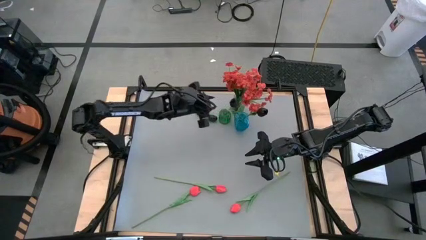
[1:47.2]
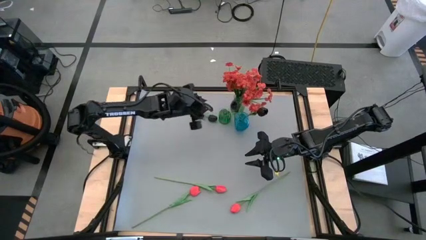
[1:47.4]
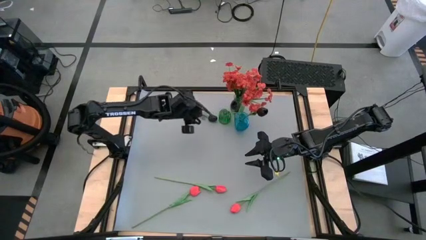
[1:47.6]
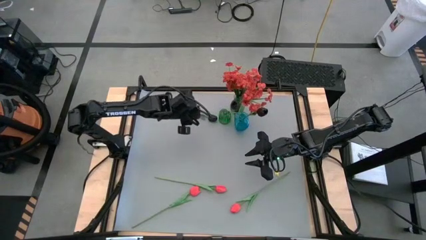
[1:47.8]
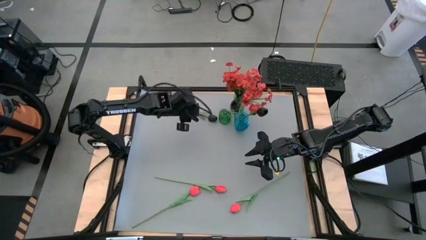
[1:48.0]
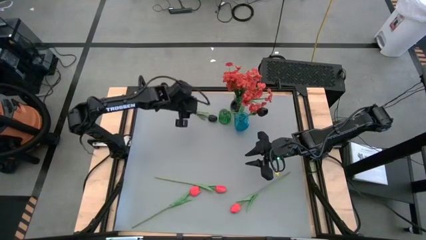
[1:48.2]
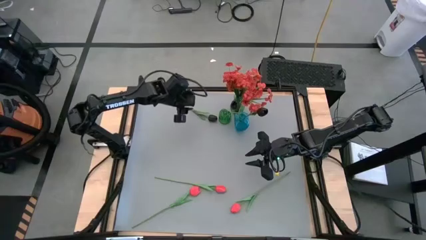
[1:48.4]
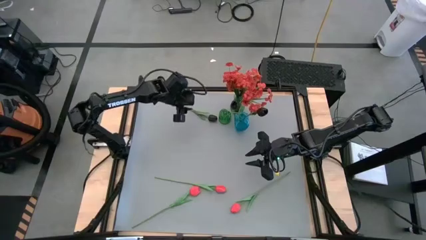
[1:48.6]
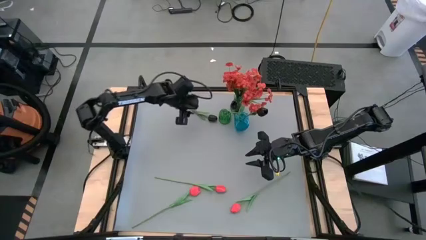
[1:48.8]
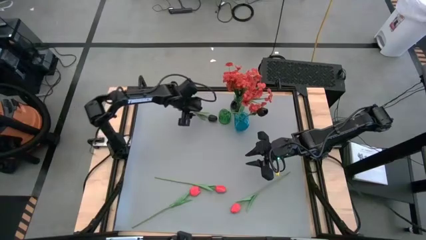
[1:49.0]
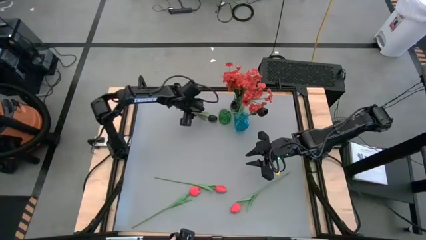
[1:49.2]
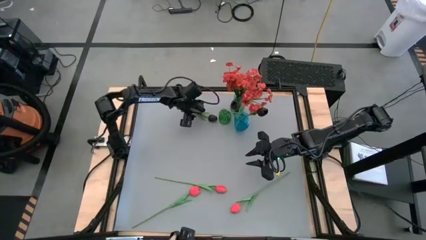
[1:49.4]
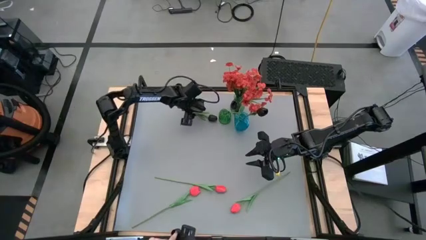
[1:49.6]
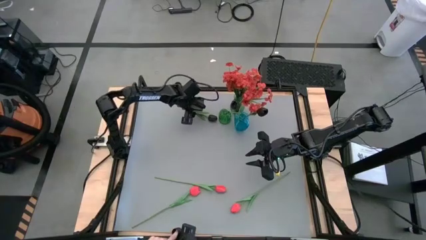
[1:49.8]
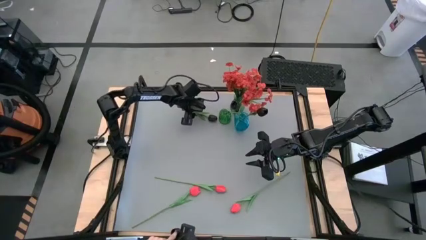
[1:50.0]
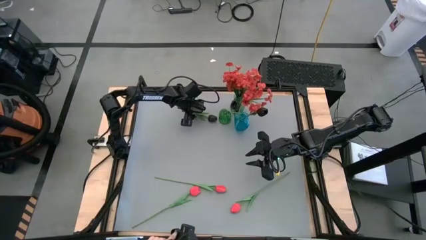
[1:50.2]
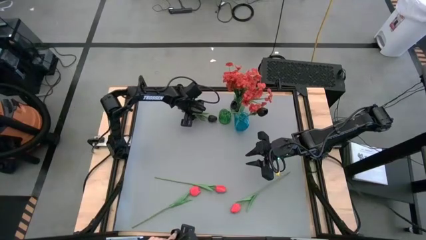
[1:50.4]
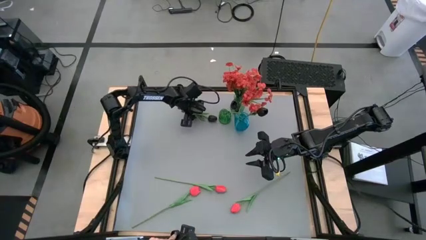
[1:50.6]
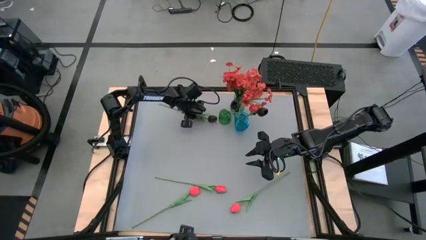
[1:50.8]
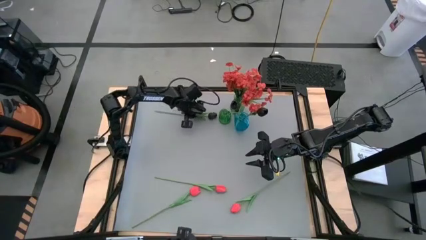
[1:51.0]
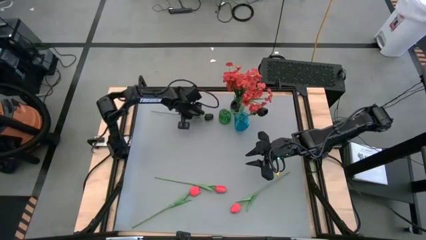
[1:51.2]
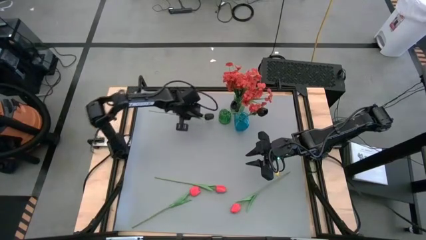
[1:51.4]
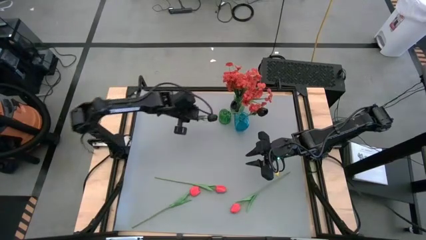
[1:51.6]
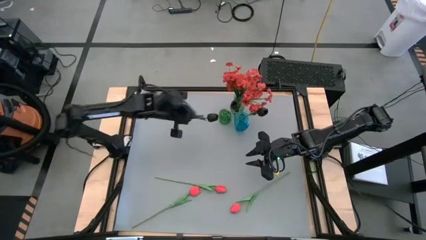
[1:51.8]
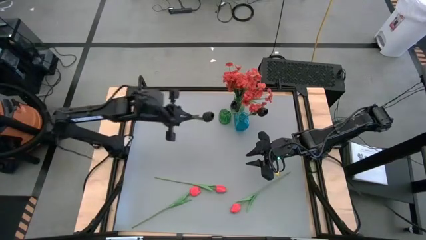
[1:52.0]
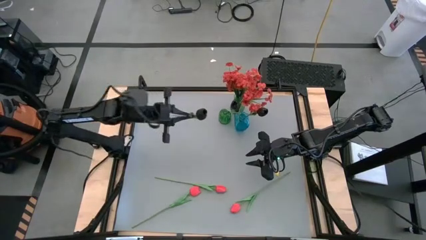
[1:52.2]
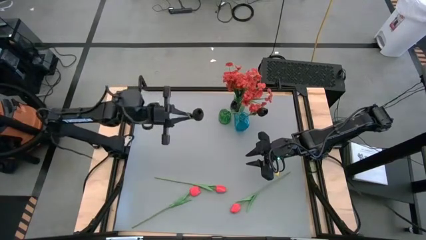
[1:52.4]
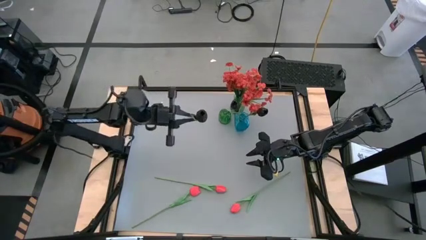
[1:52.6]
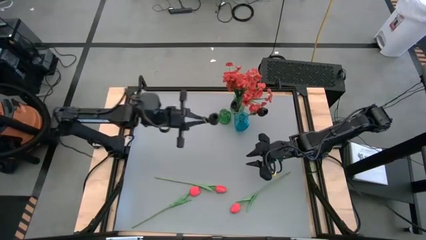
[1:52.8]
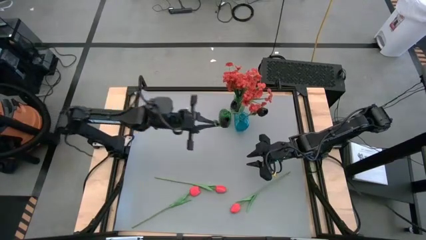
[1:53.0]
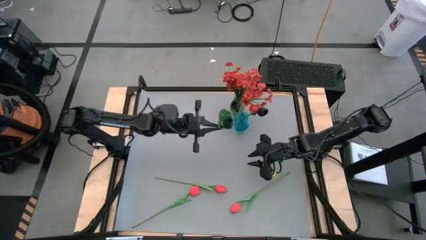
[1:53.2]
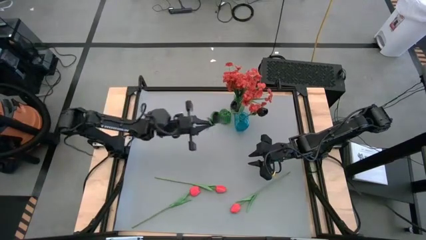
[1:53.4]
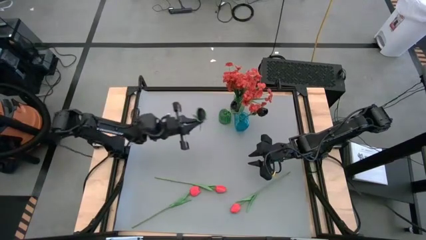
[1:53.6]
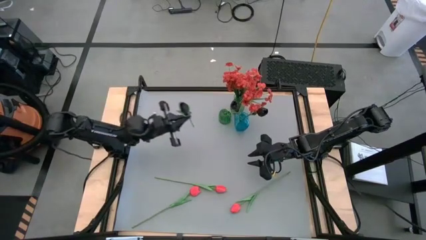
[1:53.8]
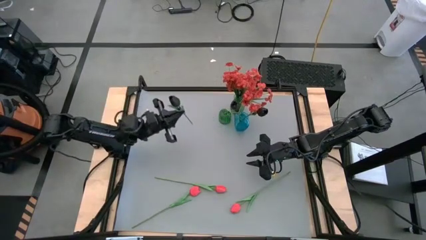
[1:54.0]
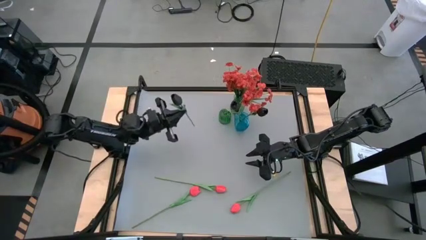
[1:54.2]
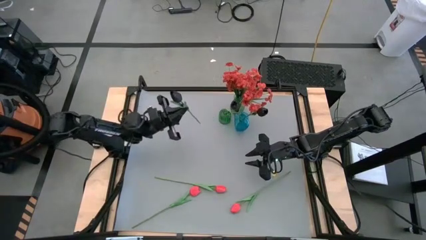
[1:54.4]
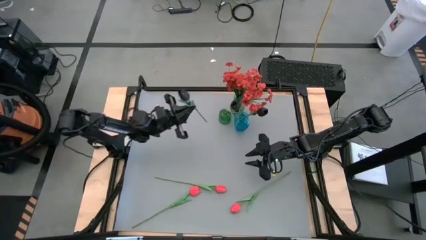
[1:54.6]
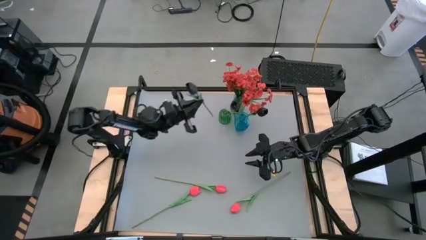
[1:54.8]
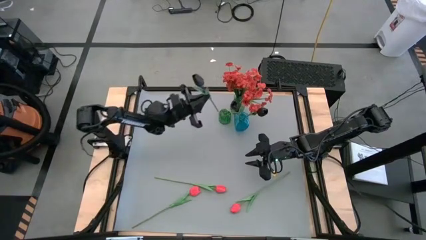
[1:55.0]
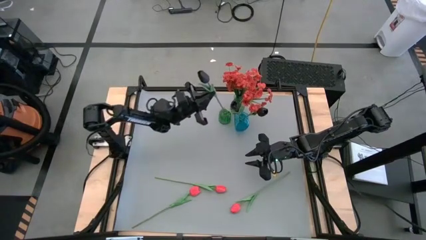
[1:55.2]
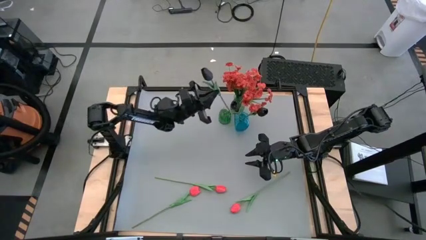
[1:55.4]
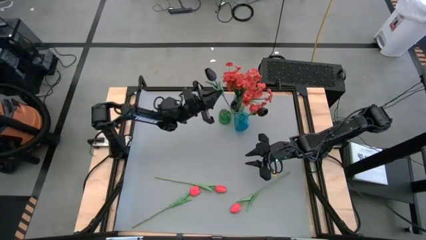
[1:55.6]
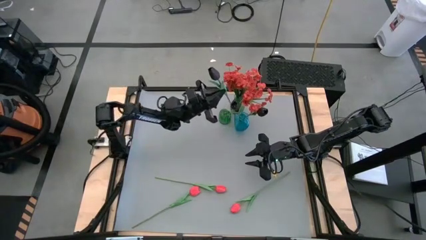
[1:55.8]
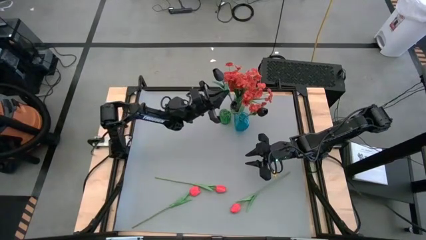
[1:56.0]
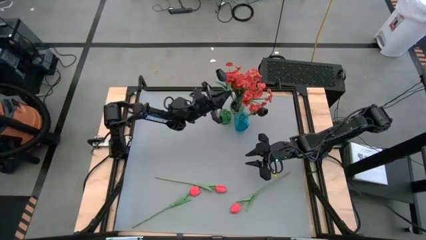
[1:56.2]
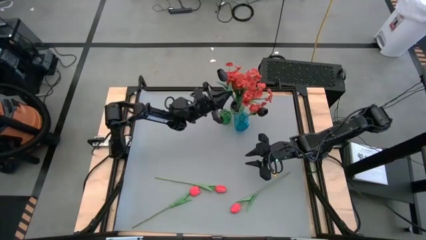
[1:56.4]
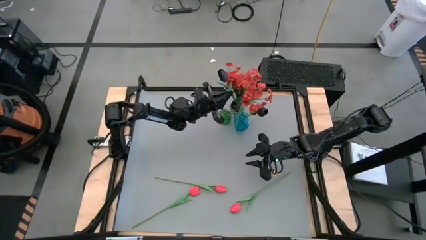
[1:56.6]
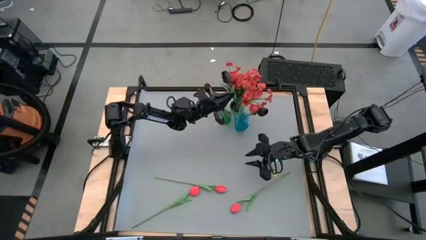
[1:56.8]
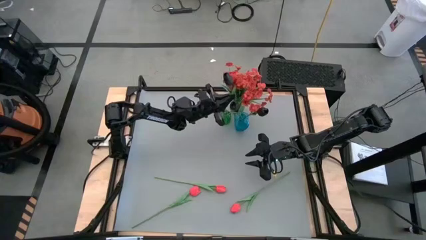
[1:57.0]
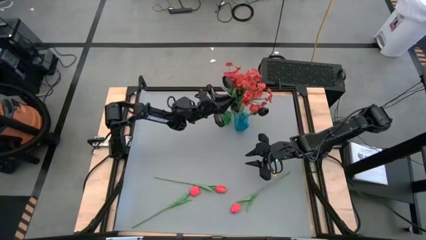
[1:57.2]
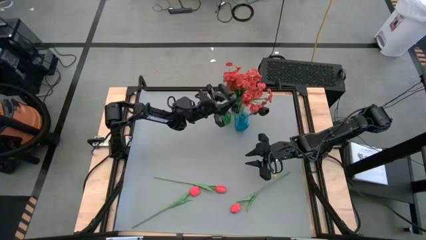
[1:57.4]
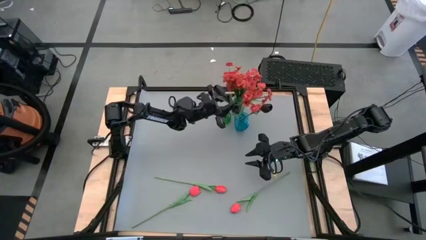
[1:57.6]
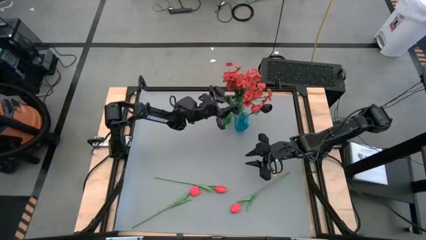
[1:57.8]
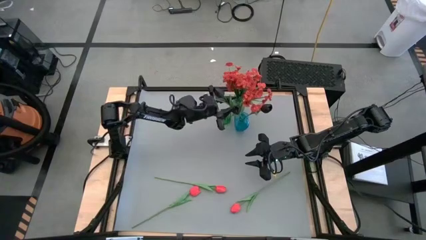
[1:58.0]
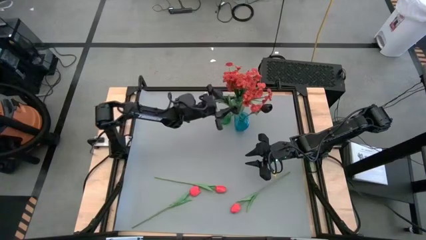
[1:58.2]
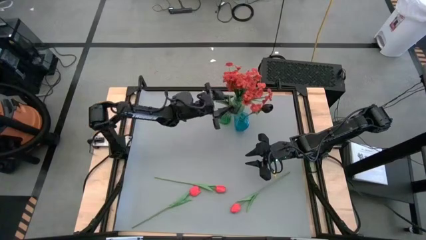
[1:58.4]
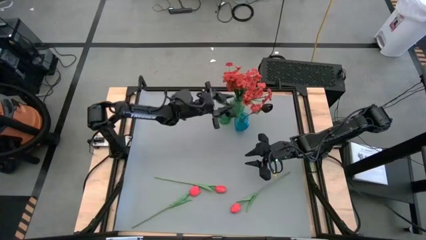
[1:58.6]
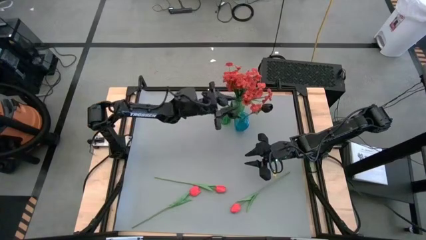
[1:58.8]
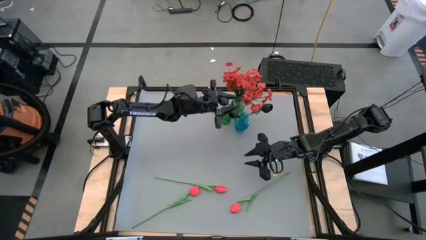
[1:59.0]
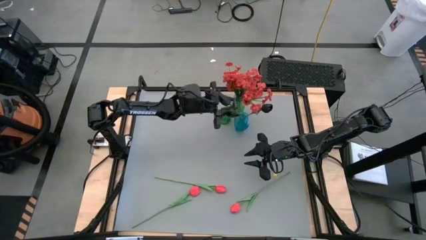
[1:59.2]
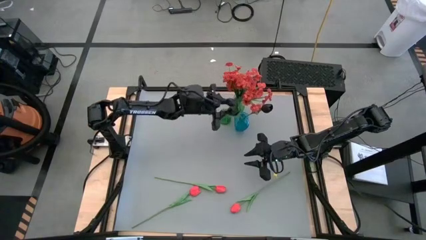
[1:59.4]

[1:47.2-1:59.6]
Task: Sort flowers into vase by color
Put the black flower into the blue vase

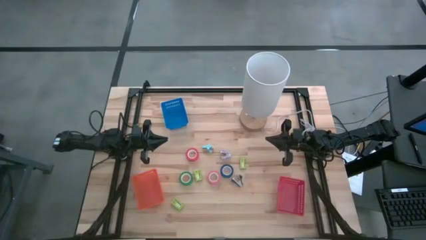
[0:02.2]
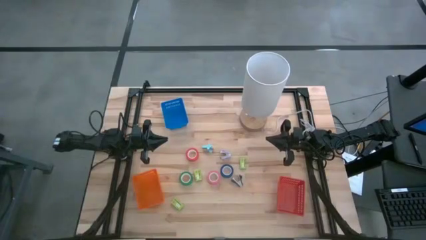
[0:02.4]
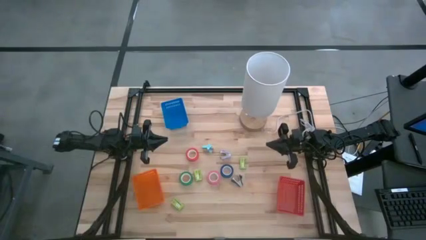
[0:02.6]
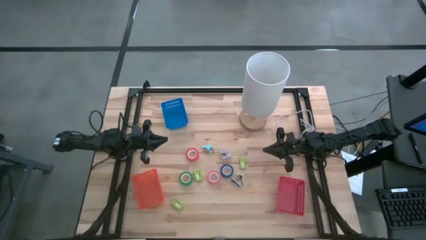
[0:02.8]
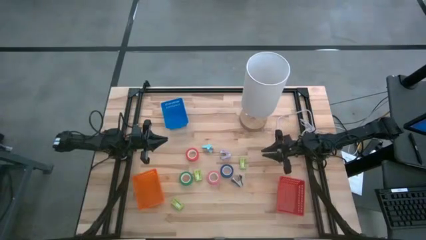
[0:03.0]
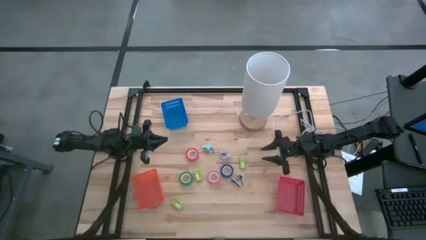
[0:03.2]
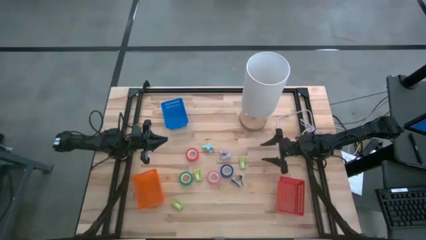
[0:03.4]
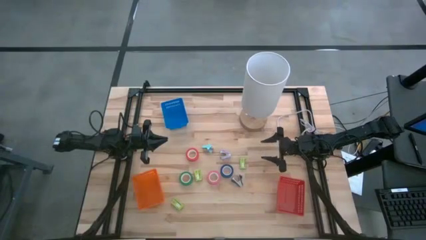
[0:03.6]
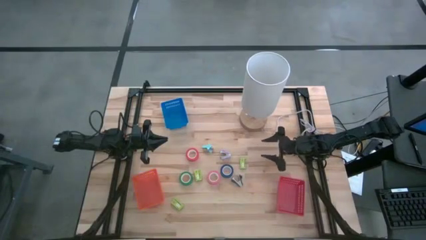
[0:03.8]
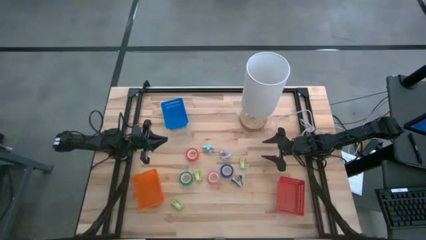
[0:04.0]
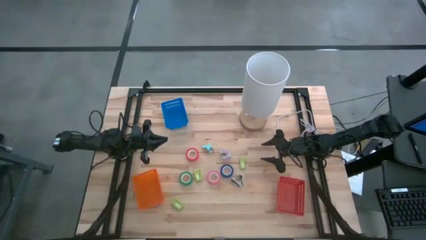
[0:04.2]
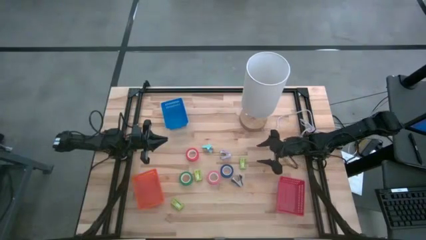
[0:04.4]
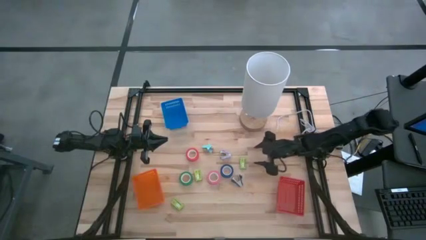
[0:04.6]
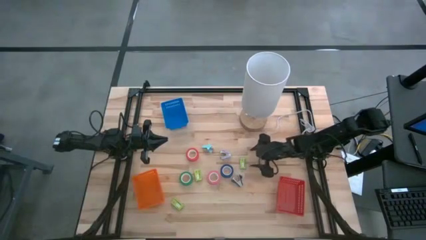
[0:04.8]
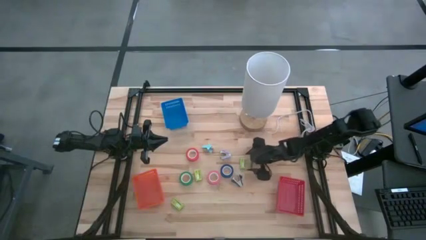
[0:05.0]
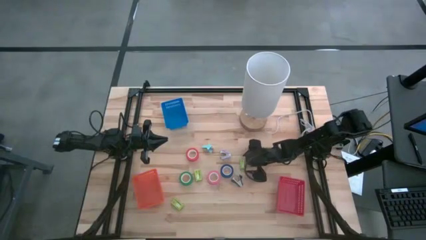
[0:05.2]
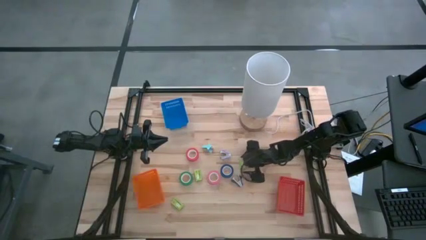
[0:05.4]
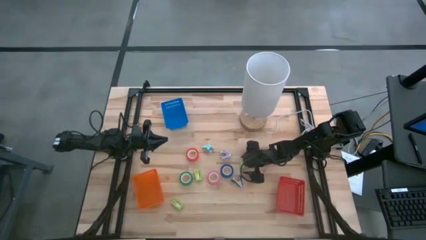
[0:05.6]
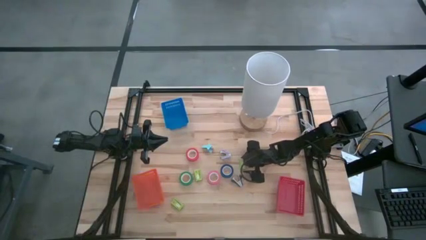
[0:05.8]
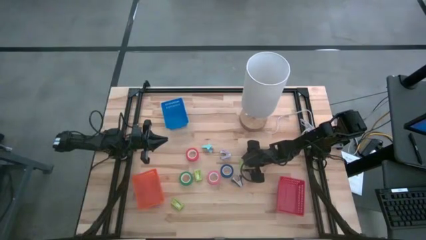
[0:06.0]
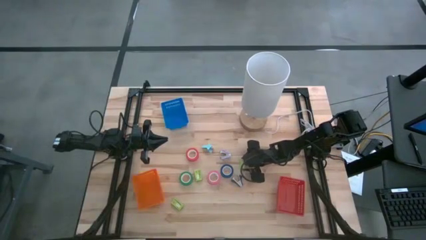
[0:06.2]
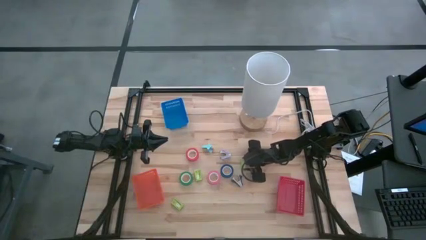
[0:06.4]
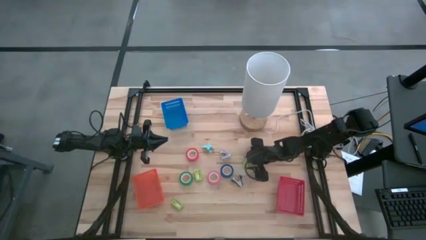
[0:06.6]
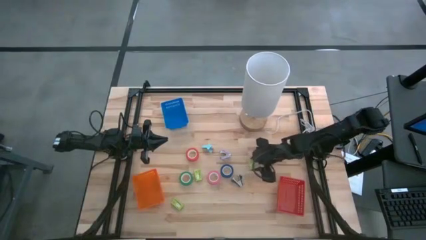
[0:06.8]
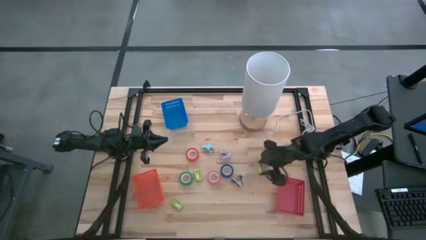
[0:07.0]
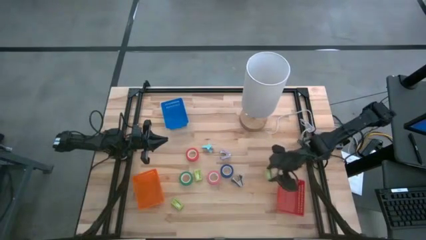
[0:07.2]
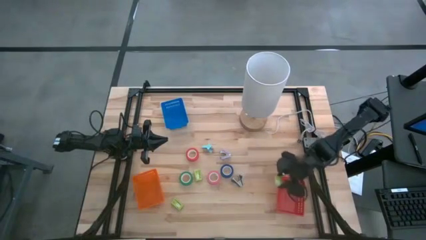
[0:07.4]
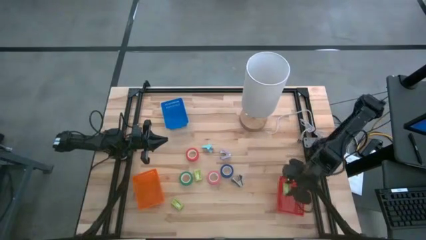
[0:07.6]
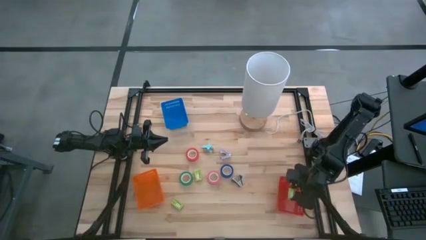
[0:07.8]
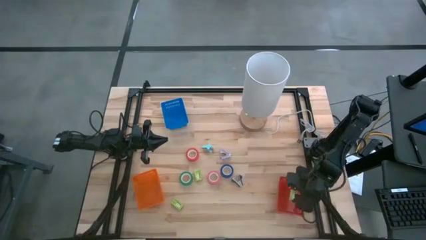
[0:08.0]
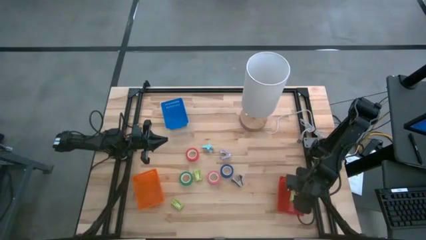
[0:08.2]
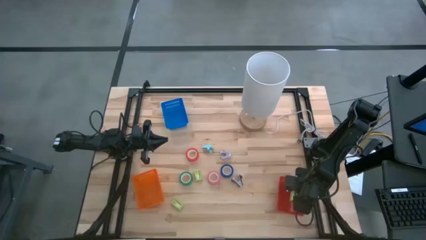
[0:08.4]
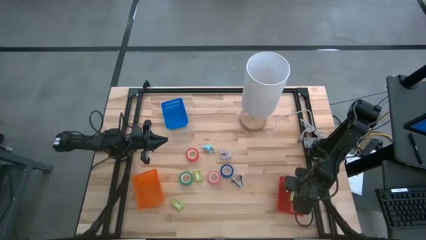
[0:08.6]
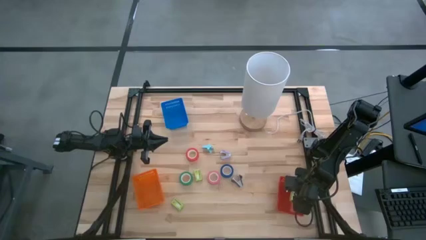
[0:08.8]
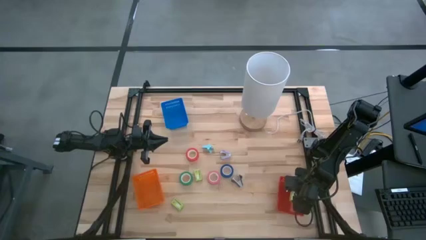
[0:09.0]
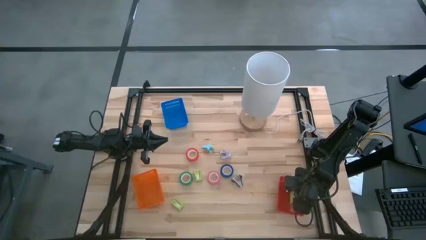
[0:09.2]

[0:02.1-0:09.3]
Task: Pick and place Stapler, Stapler remover, tape
Put the top right green stapler pin box into the red basket
